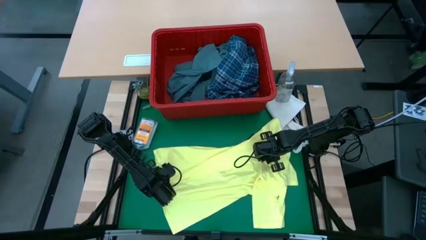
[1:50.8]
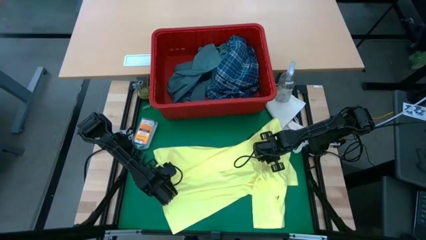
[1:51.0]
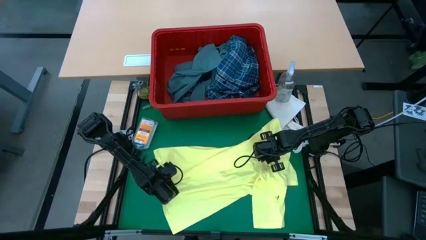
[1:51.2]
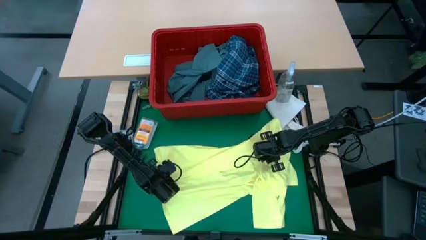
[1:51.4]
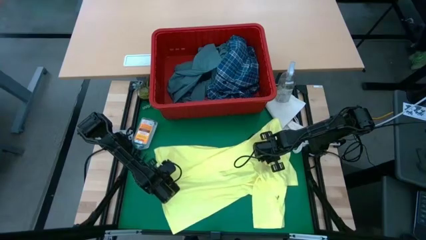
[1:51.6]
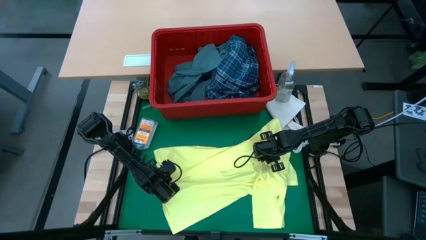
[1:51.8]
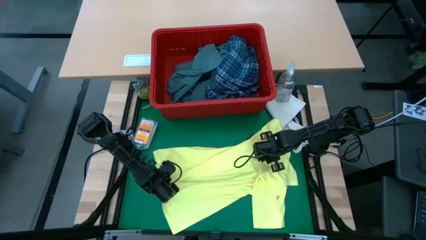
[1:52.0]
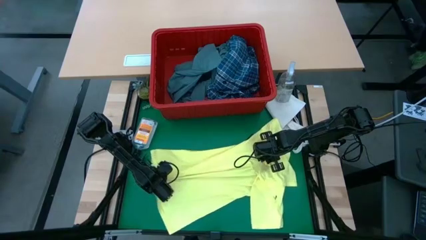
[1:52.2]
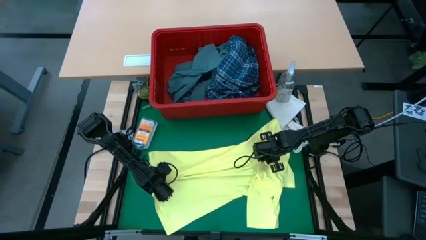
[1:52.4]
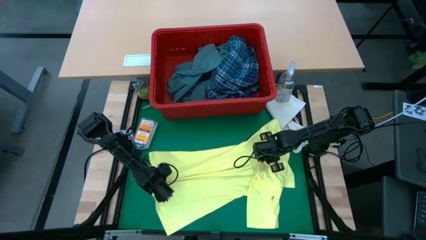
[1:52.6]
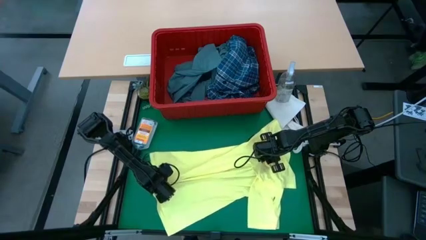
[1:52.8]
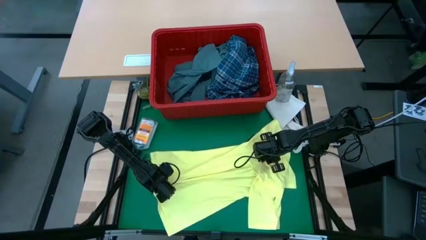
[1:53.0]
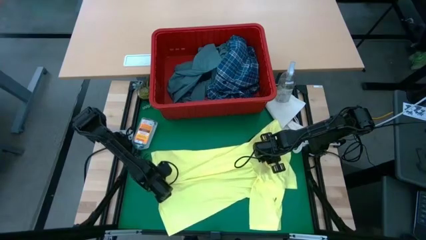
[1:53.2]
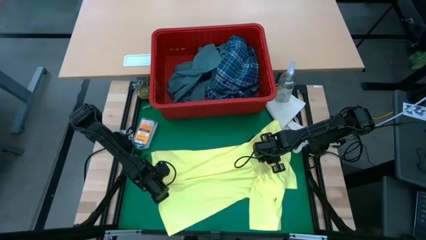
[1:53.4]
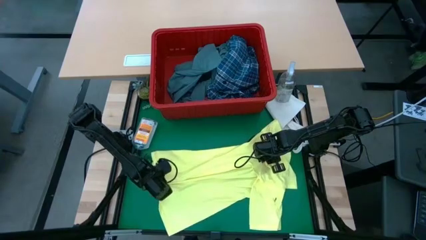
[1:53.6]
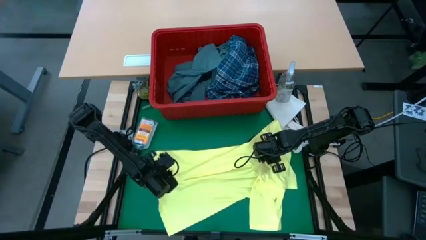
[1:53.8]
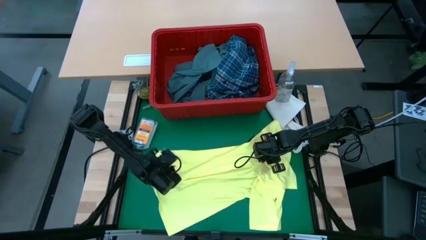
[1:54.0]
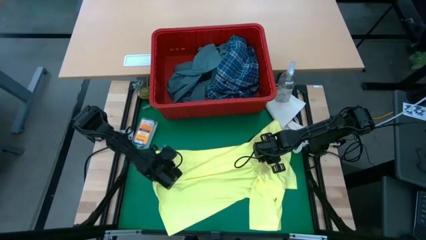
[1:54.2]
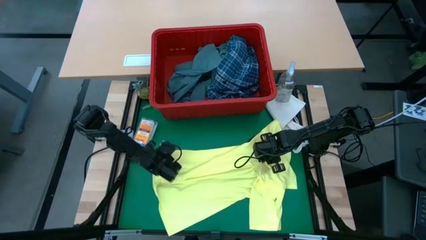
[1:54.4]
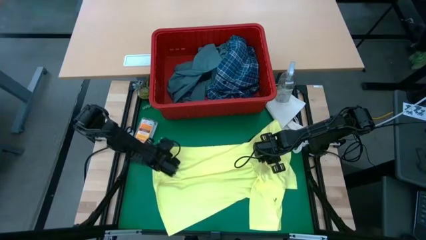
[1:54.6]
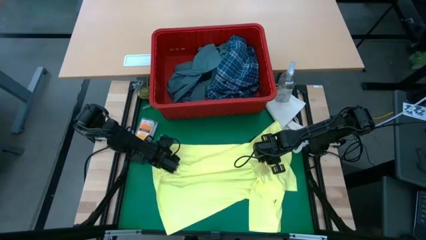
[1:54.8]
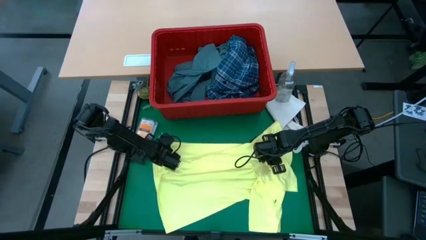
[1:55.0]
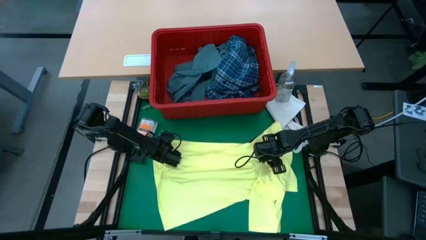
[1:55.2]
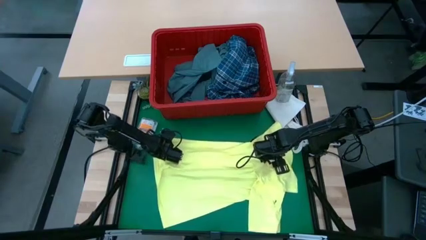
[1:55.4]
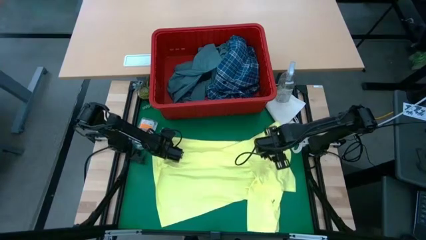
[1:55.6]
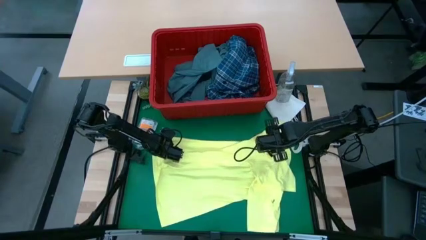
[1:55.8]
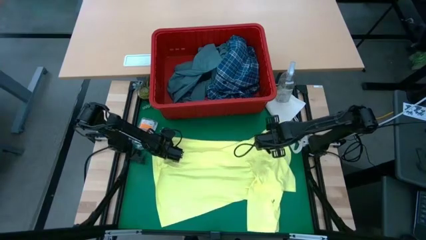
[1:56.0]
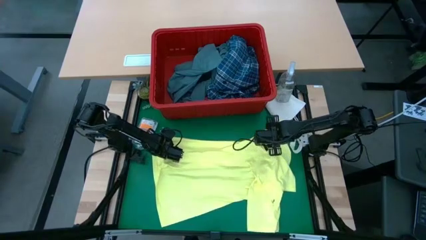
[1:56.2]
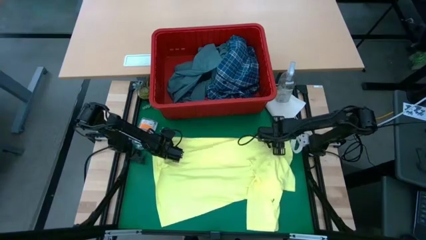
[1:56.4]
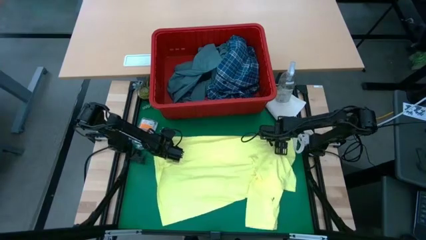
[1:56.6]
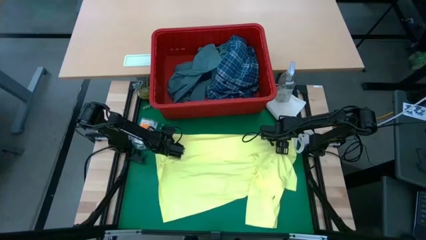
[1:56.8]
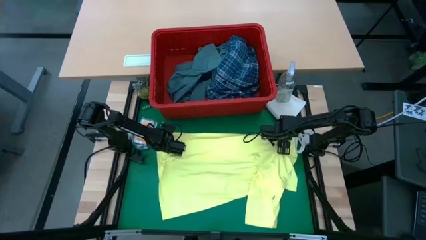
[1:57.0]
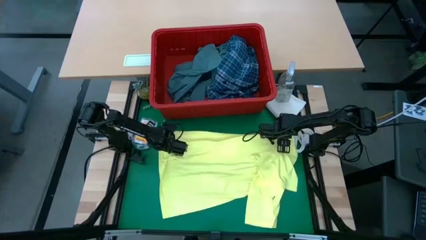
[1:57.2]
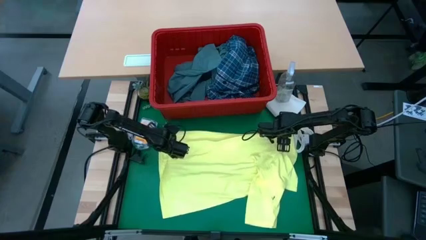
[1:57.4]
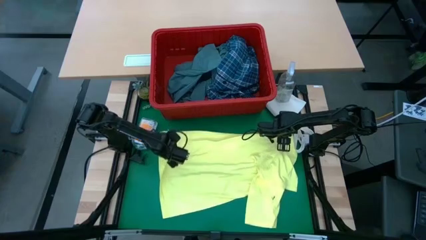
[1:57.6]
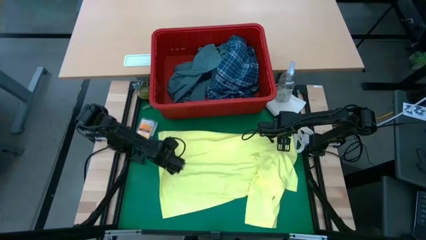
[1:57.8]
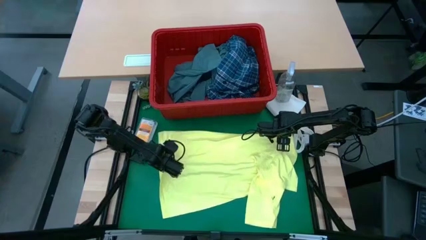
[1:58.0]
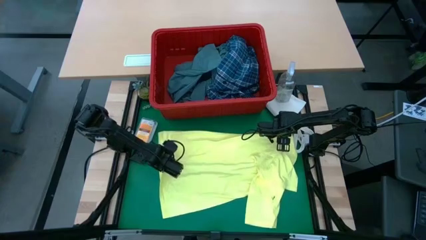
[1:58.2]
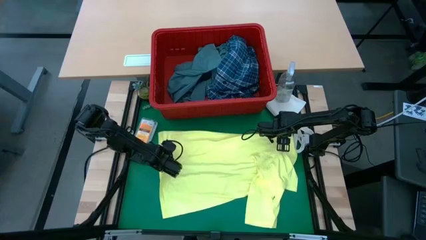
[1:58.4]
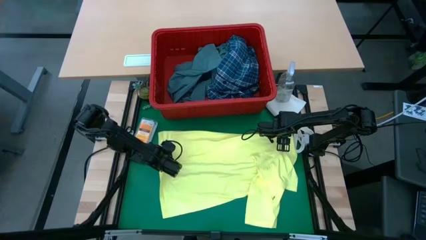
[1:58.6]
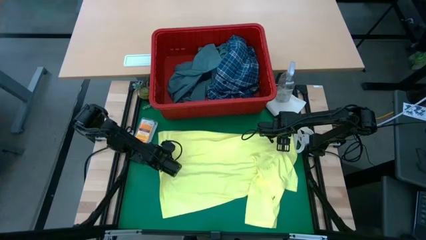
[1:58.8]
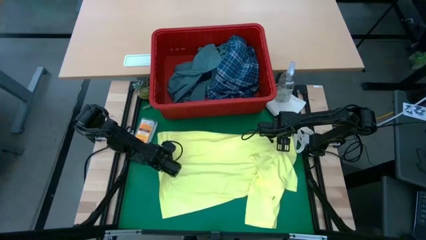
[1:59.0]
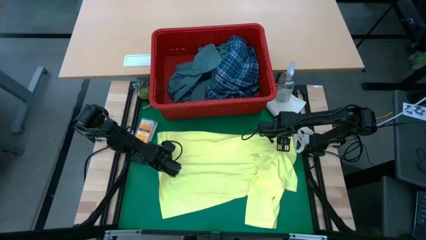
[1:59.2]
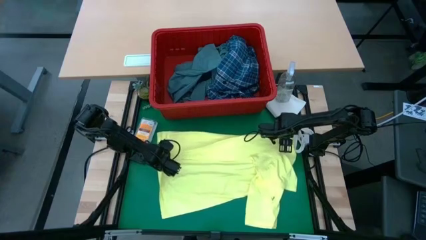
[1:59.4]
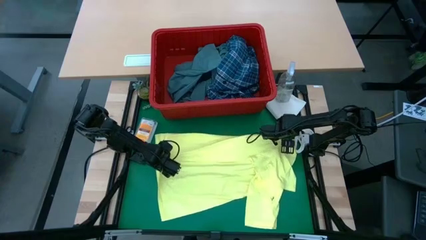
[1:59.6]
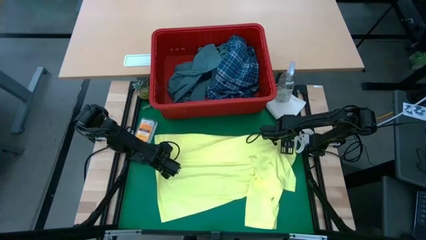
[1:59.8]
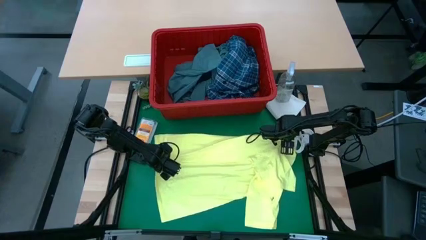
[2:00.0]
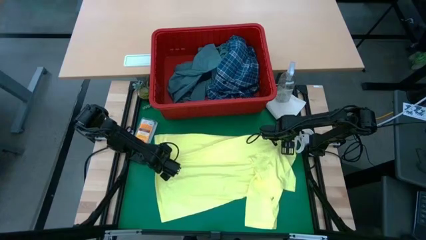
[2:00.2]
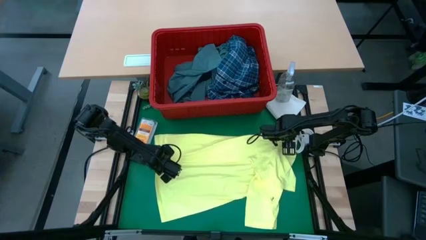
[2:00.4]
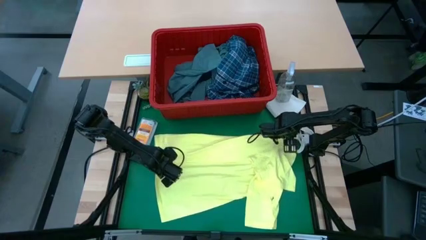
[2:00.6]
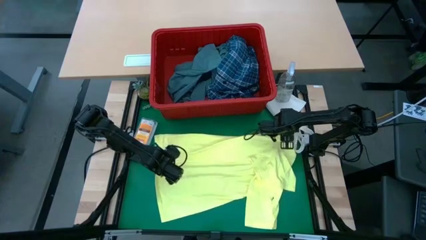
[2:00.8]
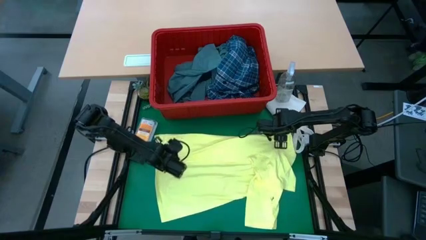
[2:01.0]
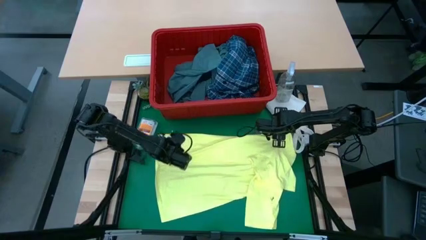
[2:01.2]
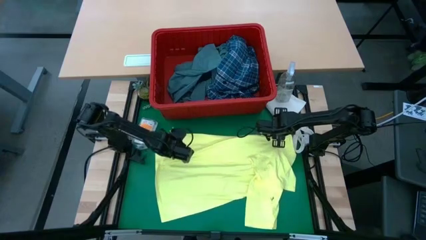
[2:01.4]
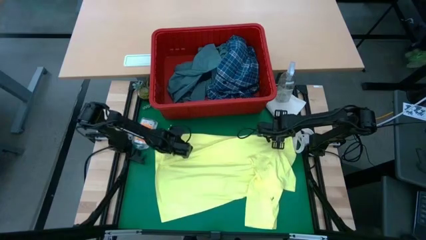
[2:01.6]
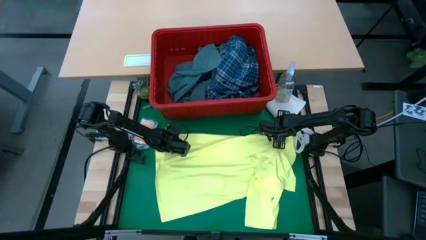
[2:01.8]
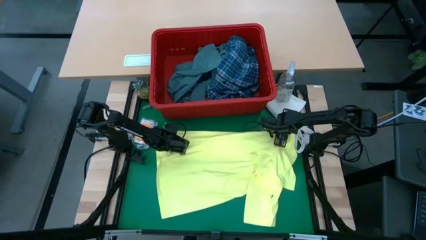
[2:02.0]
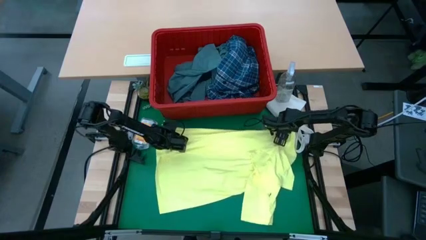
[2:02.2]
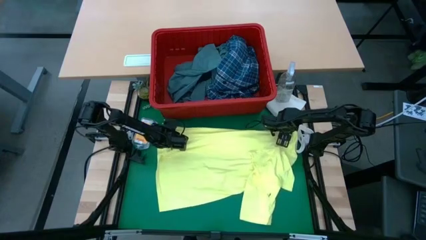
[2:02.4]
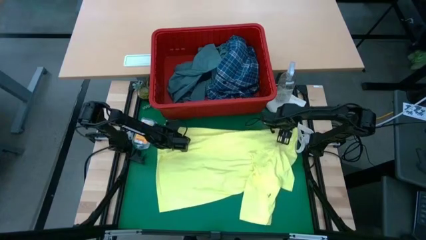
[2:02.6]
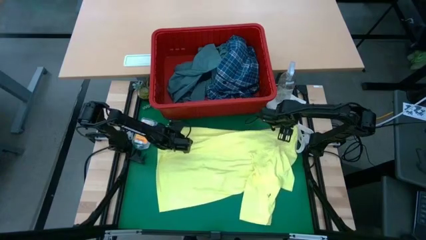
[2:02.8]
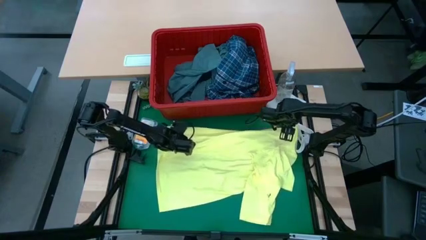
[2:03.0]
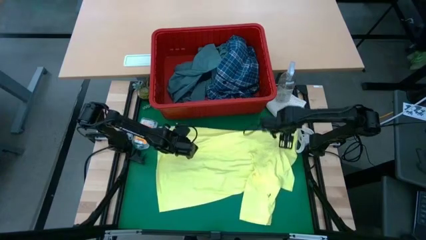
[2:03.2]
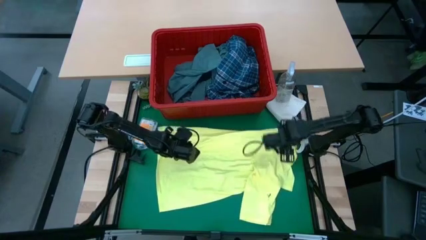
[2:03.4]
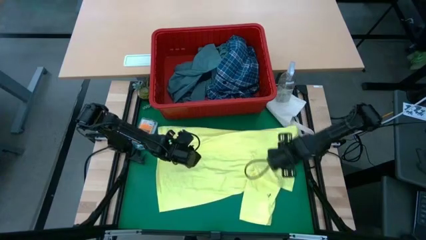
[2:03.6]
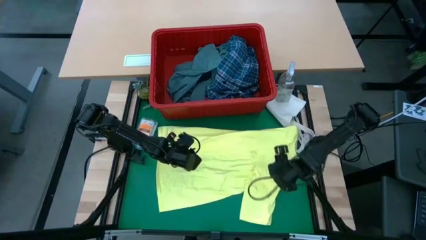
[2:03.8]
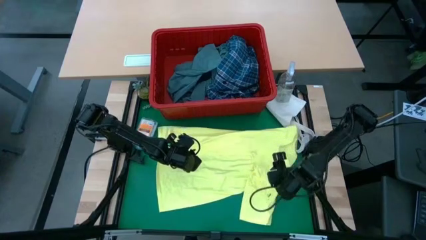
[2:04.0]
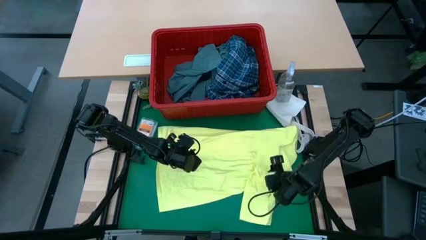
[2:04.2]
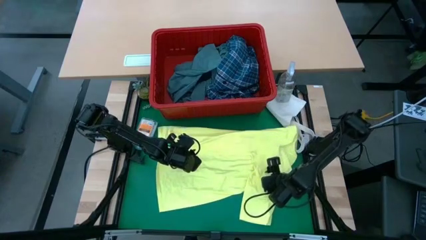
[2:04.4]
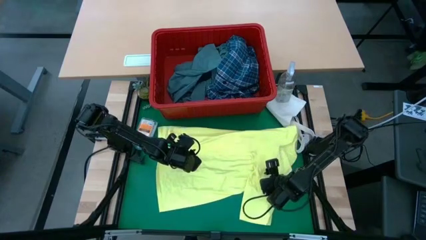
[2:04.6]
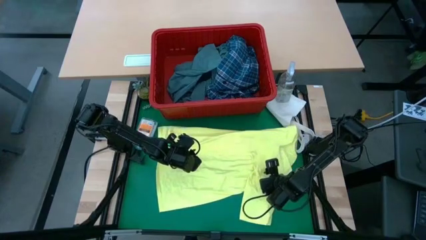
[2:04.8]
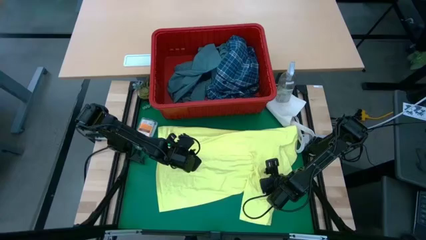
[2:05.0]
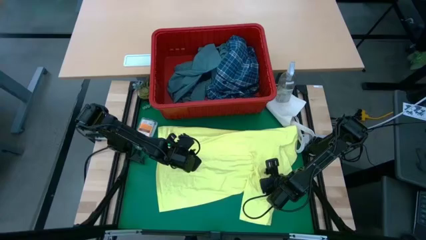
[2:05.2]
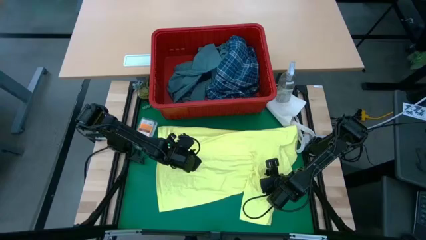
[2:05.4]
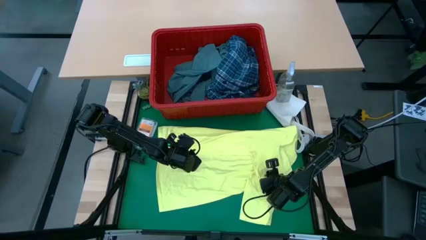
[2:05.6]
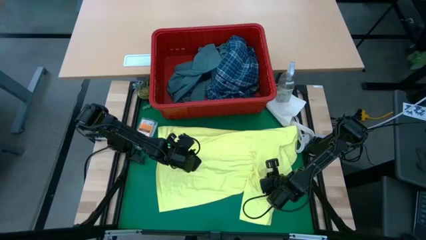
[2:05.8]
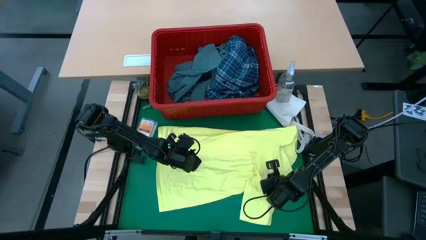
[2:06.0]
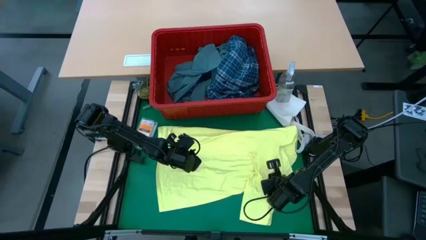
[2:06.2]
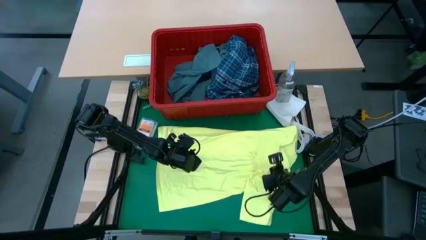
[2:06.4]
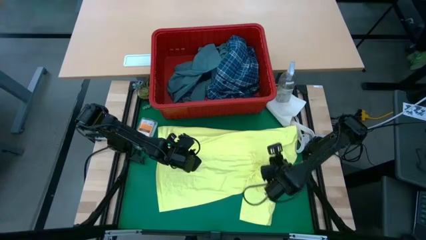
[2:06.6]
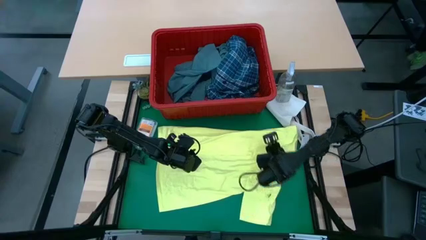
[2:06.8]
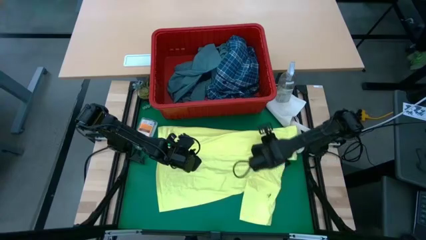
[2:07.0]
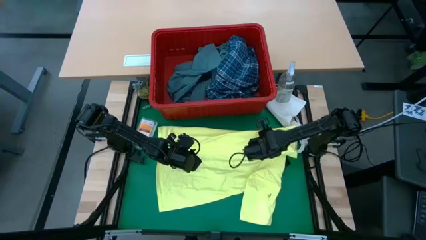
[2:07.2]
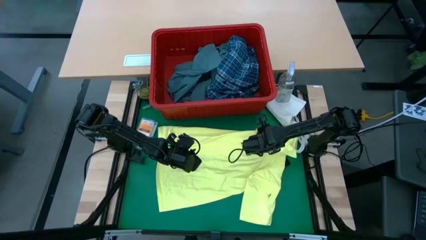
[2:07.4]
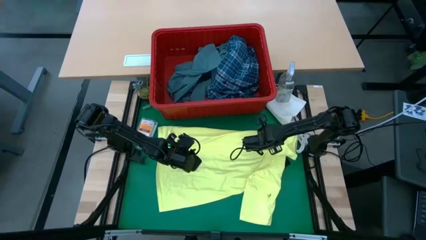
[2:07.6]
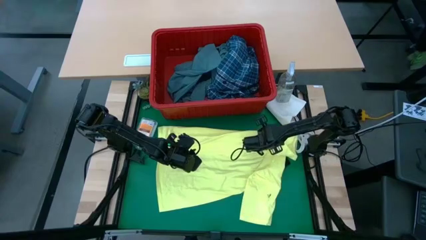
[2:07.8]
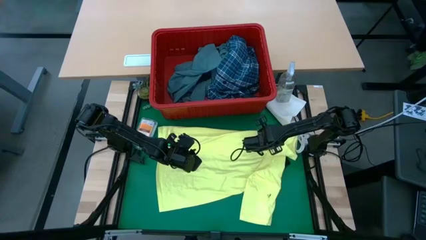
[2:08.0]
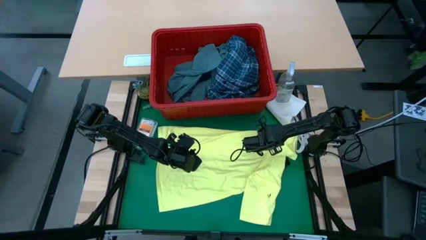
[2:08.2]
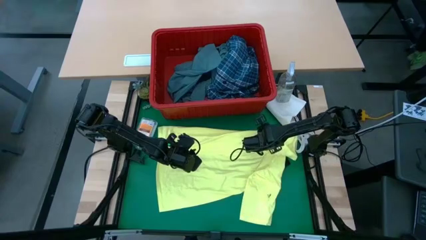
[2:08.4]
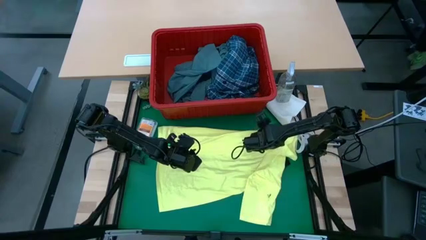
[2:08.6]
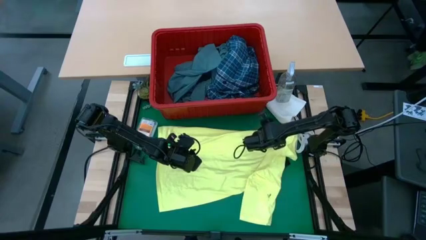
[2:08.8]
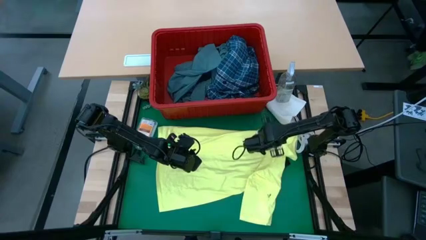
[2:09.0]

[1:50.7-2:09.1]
Task: Fold Laundry from Bin
Fold the yellow shirt
